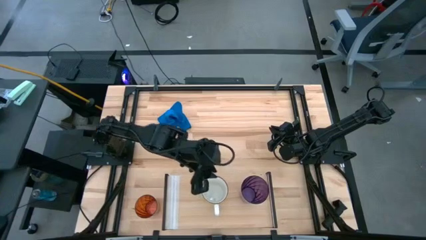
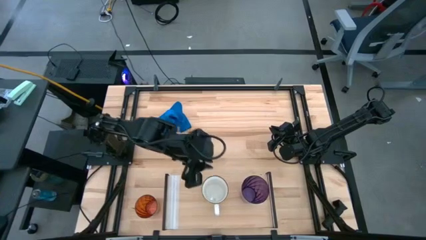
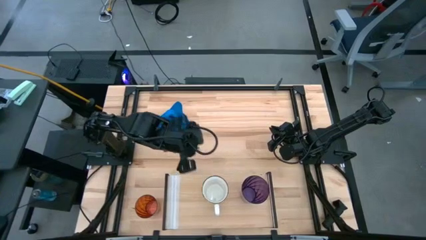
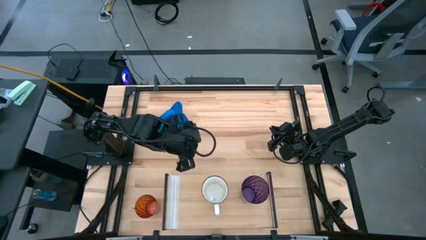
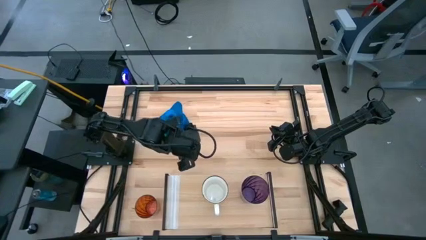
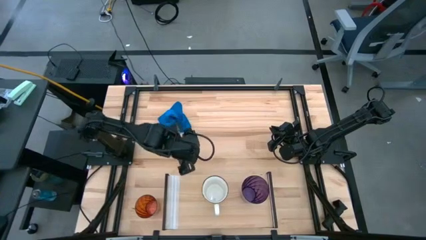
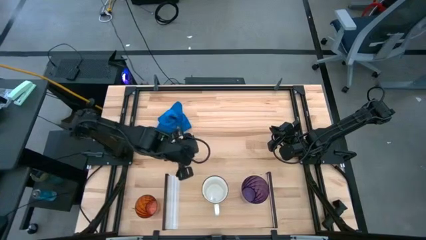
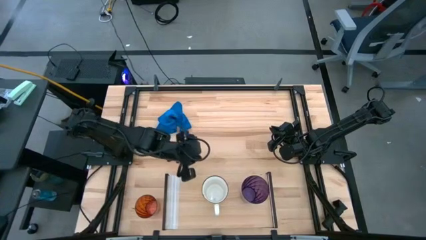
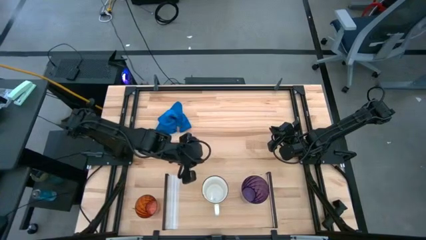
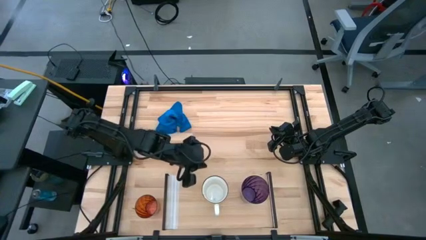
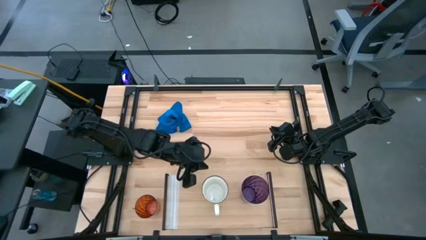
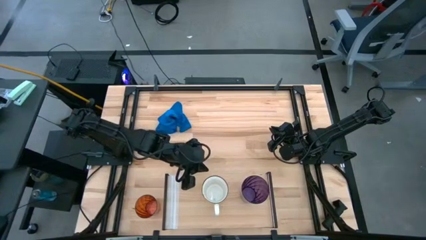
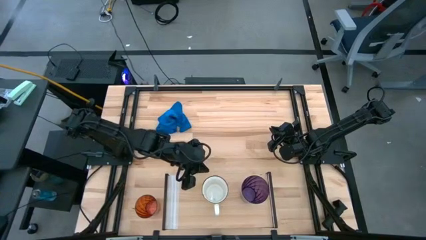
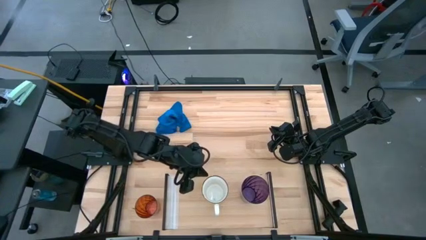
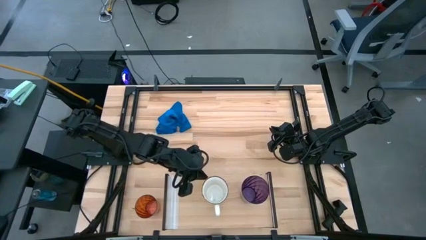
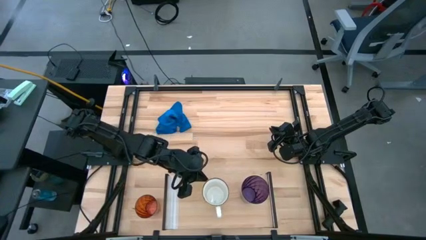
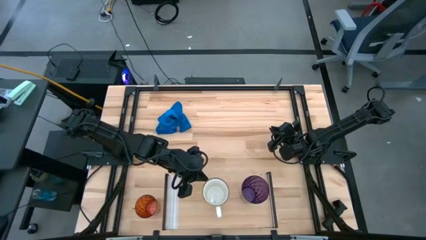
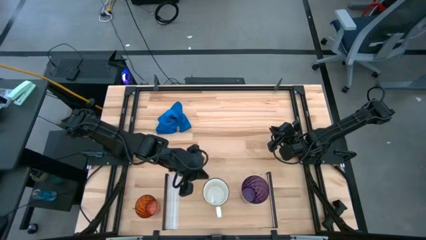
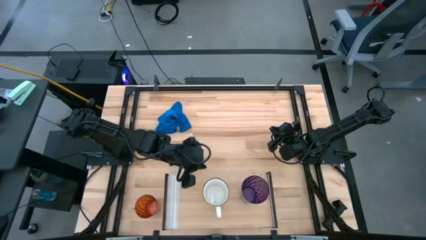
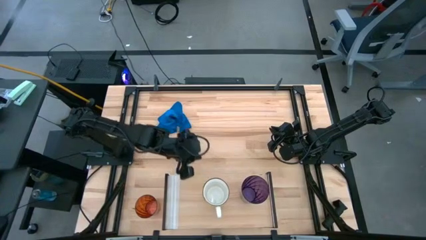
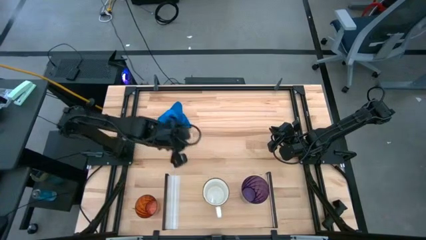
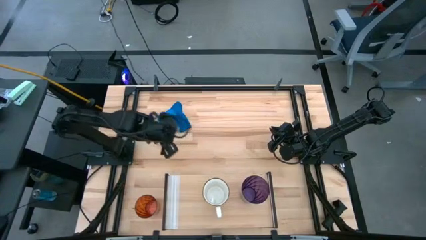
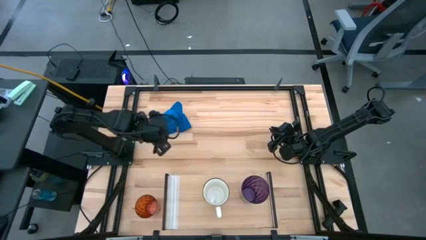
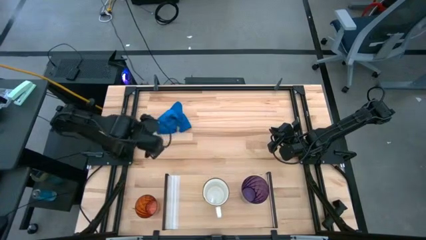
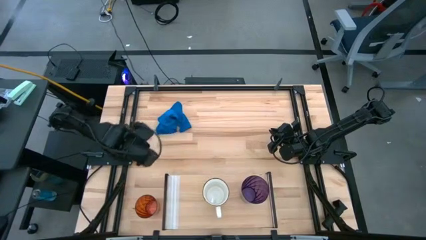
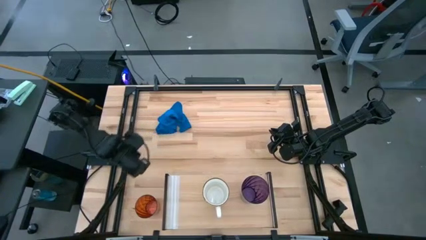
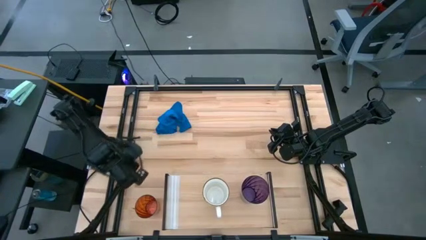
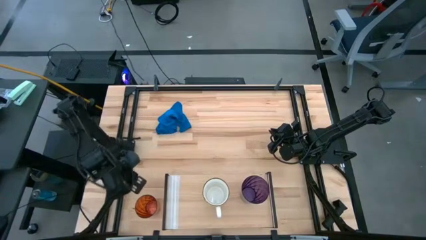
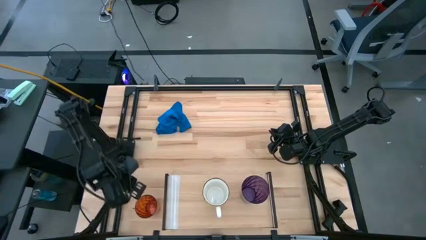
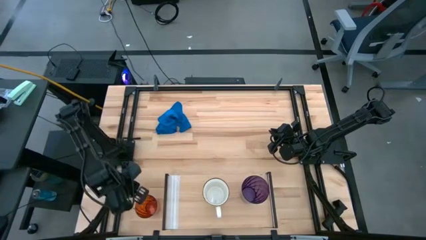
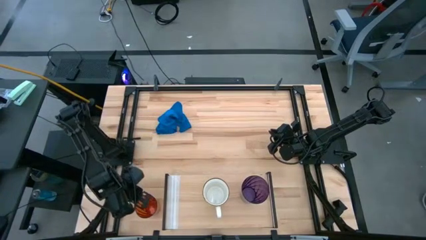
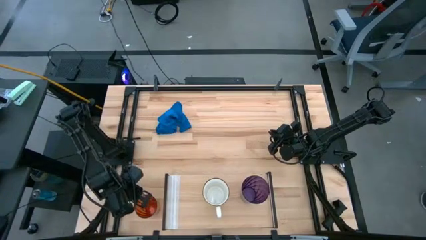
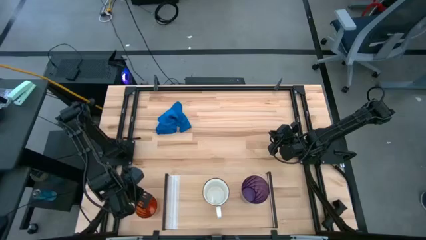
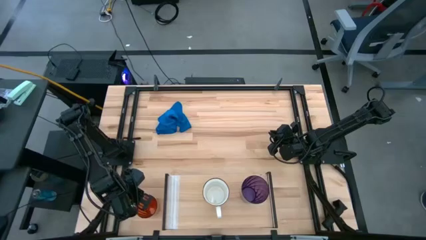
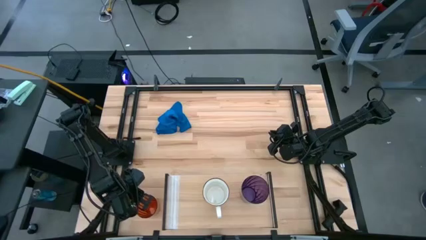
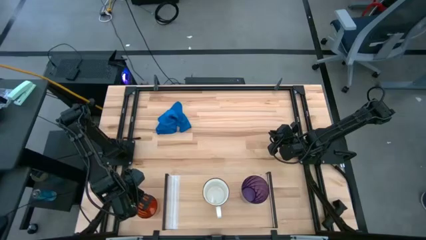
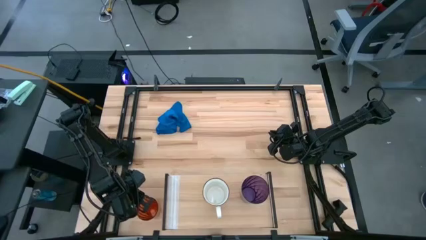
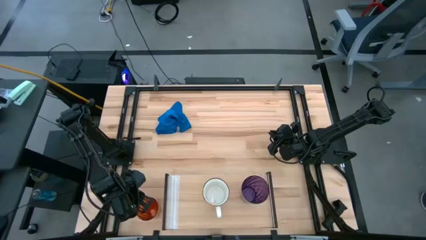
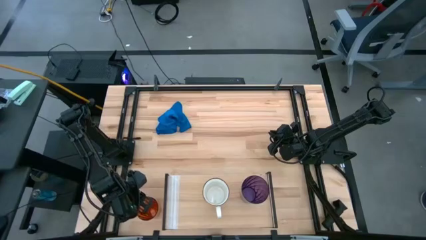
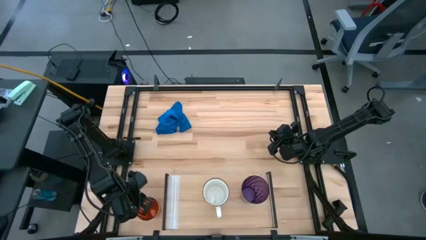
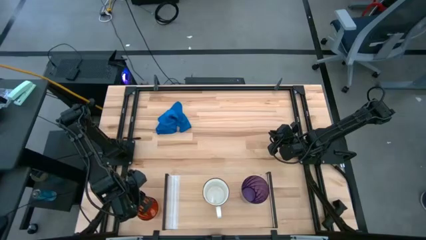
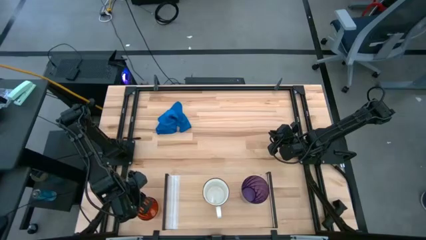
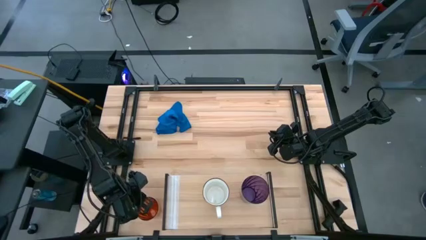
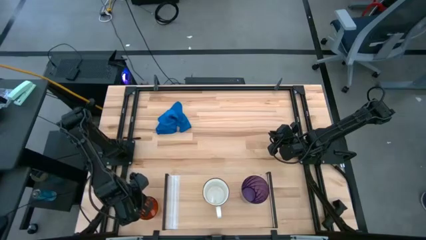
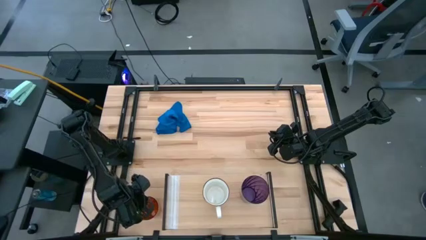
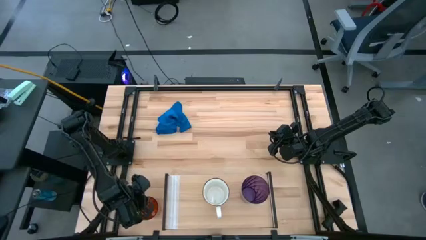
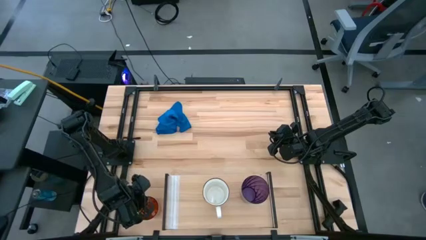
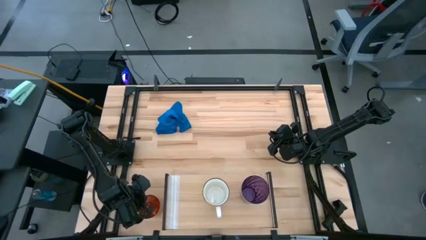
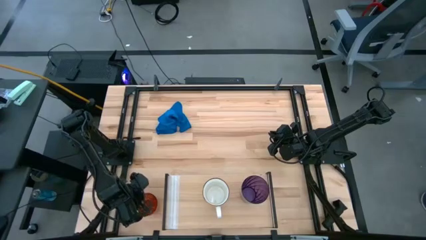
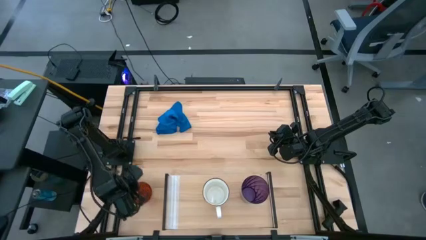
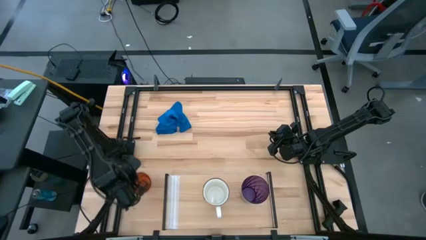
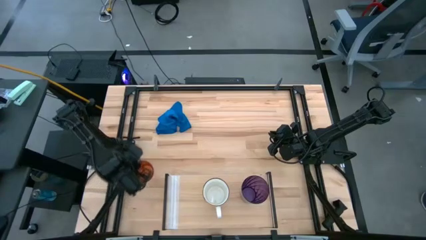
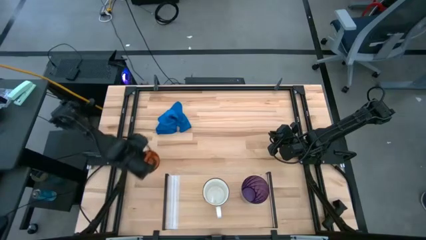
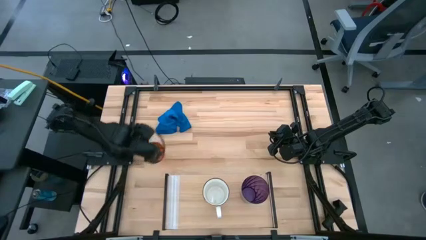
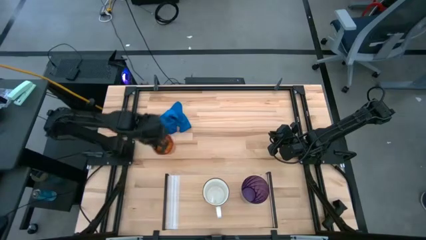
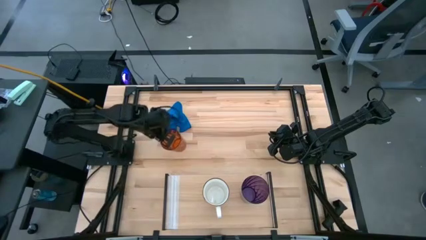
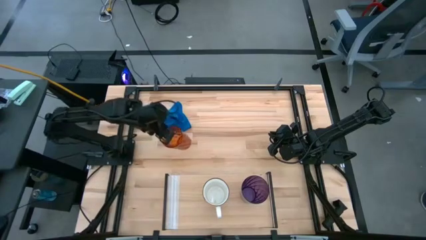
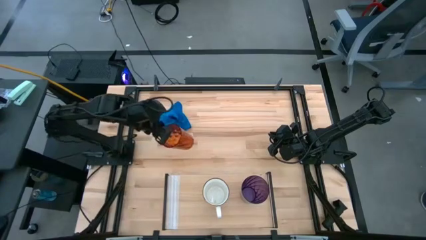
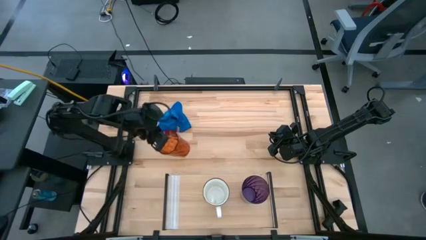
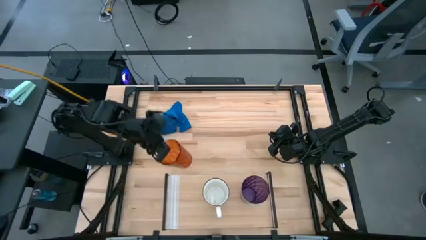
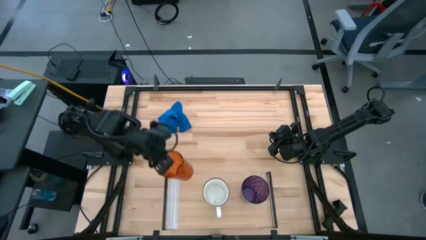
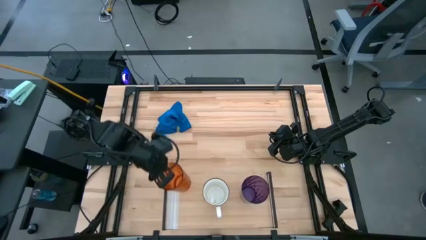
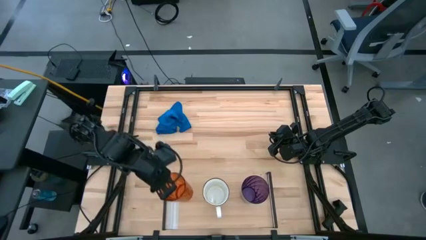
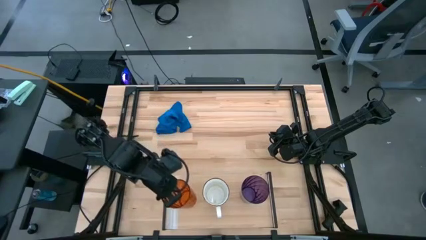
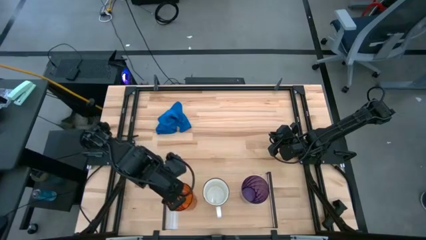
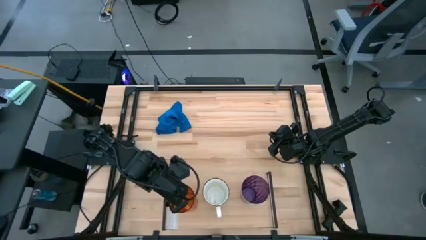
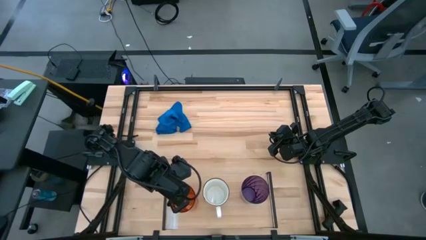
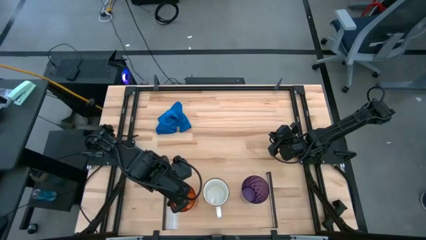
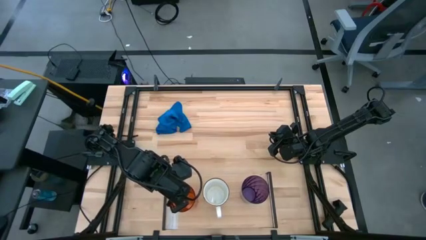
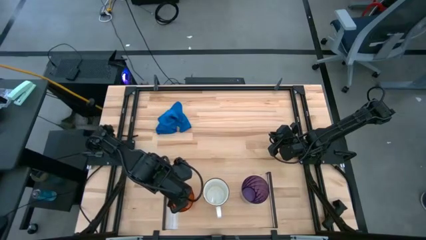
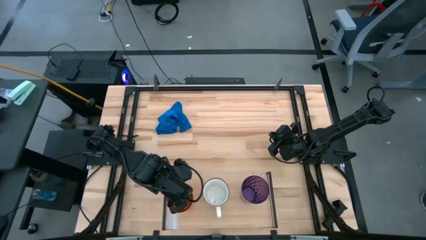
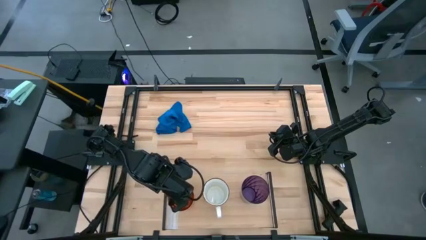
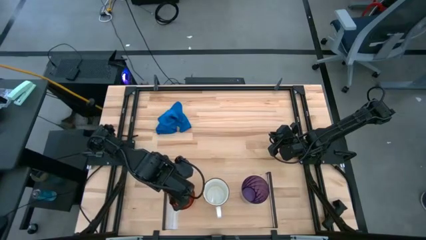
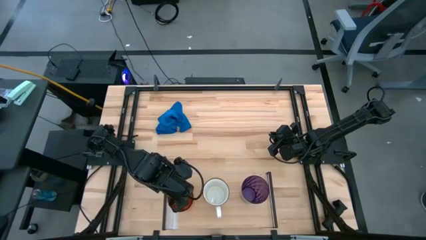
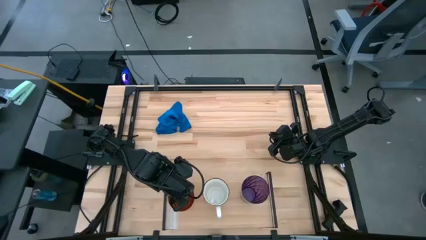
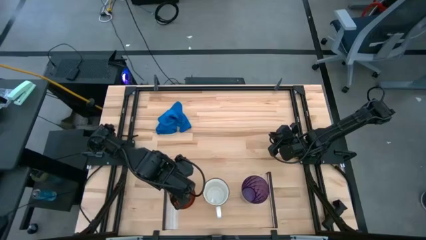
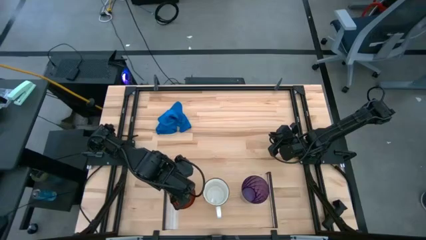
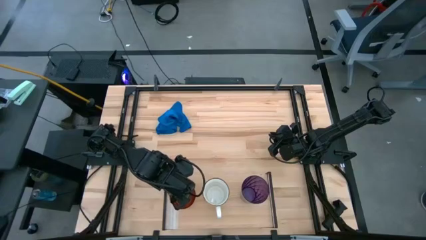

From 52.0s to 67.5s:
Task: Stack small to large cups/mugs on shelf
Put the orange cup on the shelf

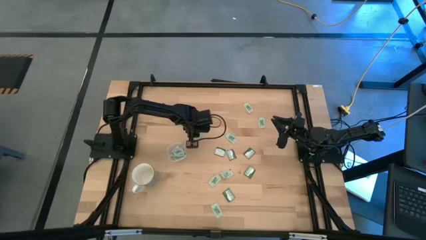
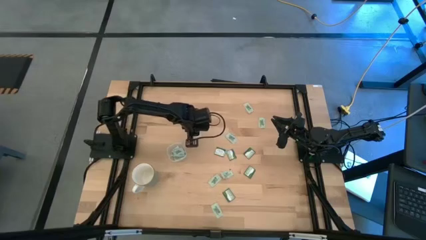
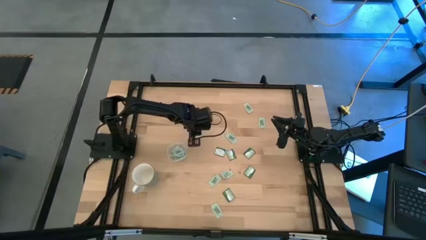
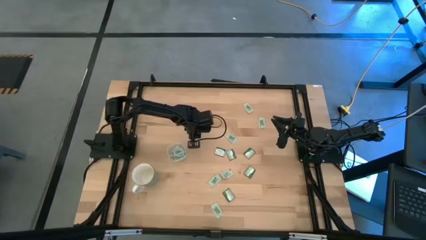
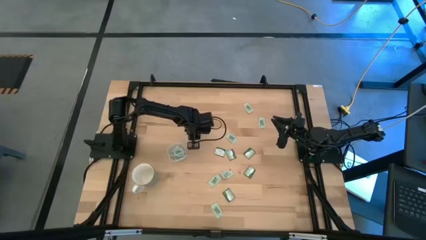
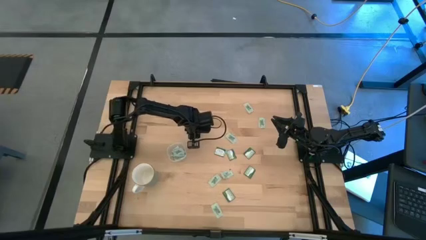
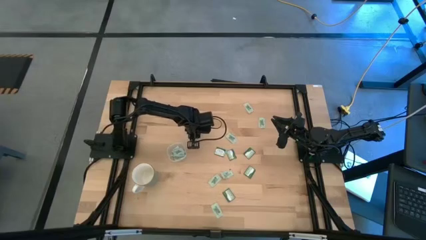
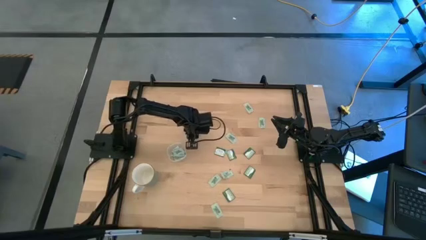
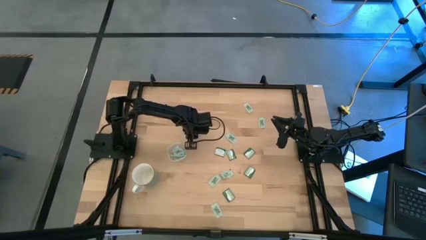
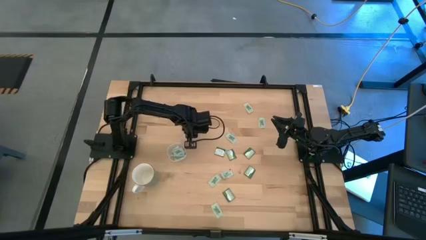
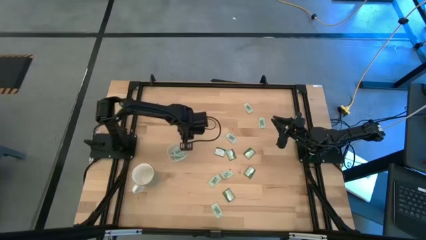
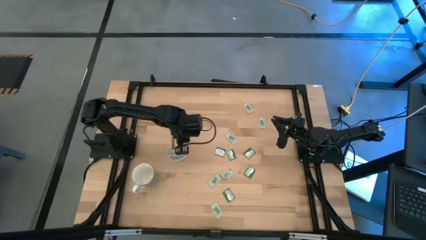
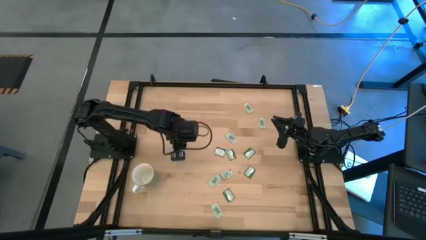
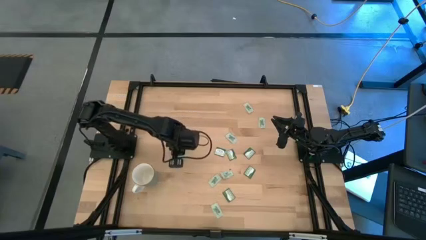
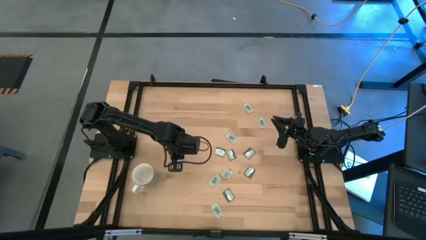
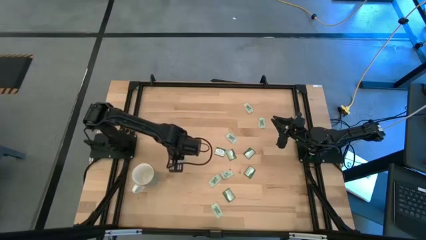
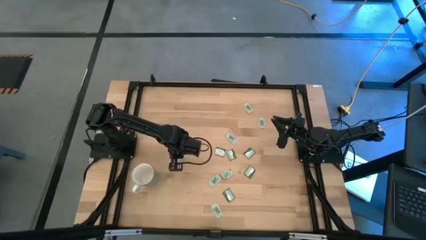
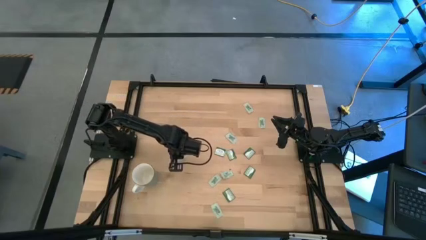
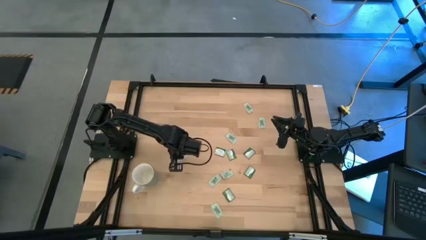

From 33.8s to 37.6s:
Task: Pick and place Stevia / Truvia into bins
Put the green stevia packet into the transparent container
